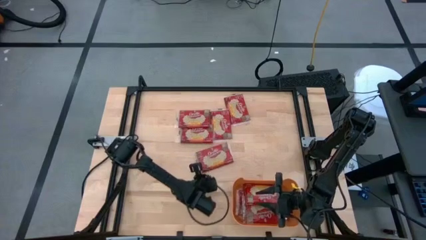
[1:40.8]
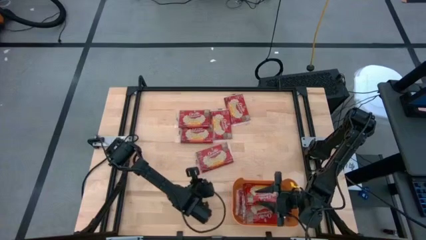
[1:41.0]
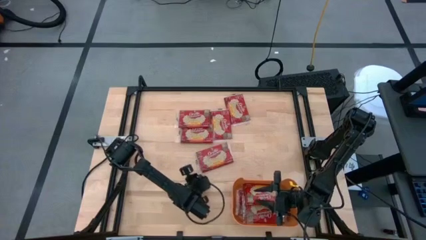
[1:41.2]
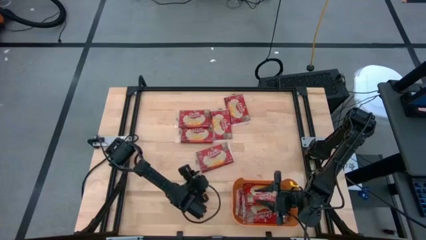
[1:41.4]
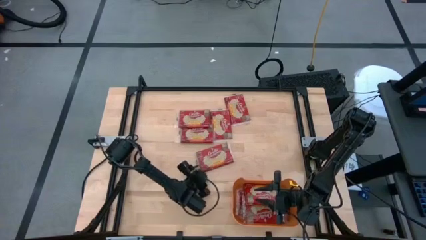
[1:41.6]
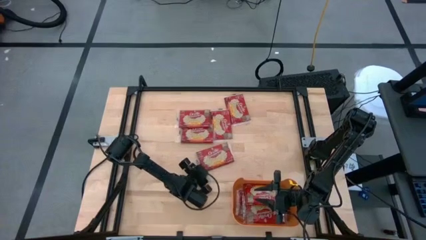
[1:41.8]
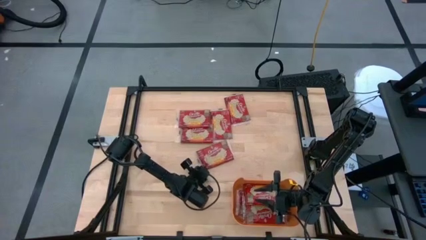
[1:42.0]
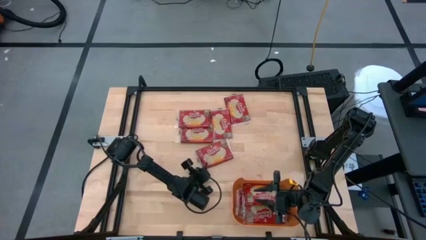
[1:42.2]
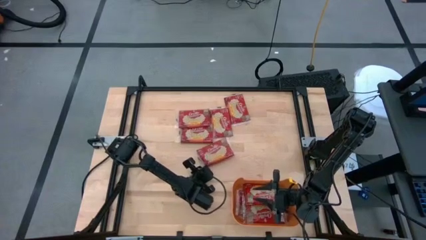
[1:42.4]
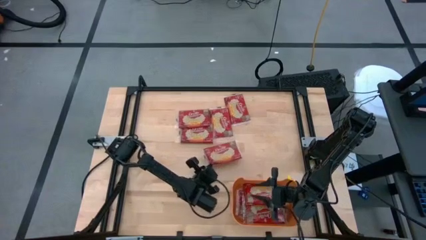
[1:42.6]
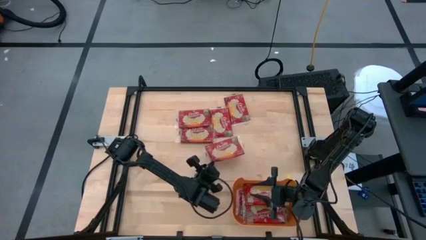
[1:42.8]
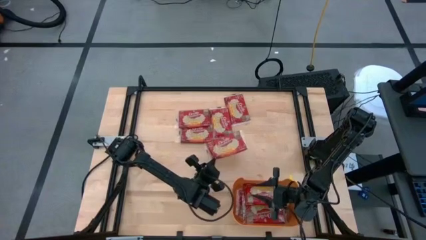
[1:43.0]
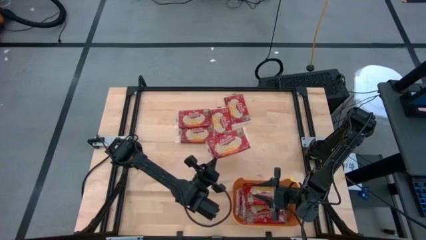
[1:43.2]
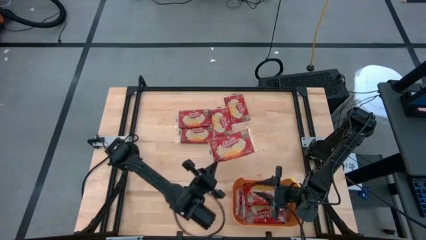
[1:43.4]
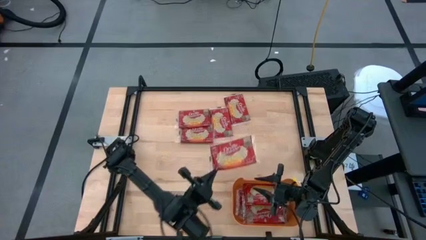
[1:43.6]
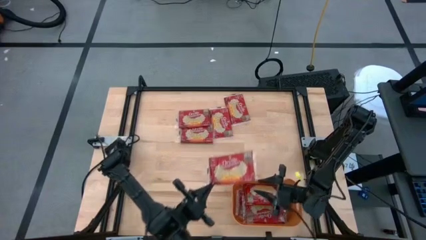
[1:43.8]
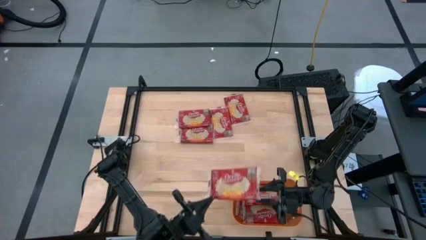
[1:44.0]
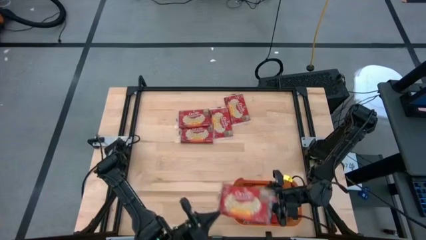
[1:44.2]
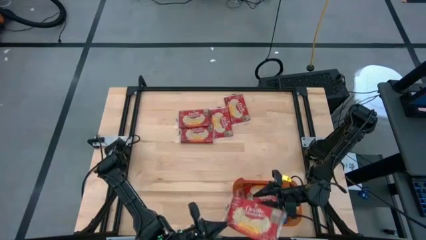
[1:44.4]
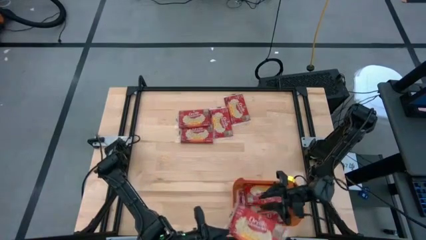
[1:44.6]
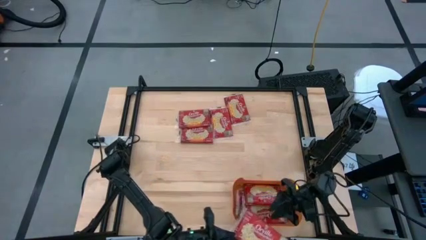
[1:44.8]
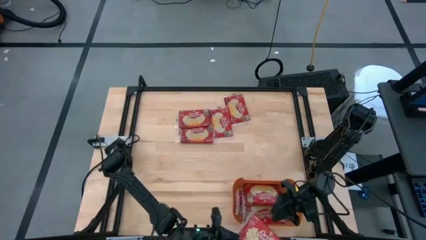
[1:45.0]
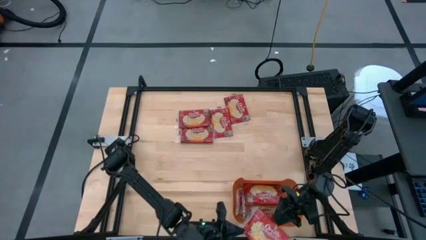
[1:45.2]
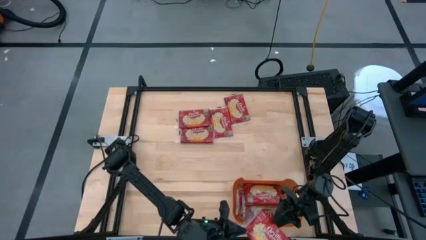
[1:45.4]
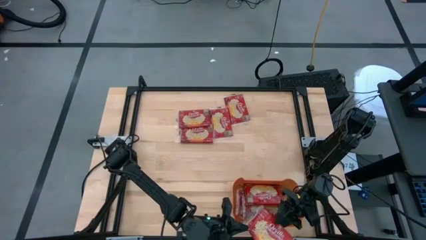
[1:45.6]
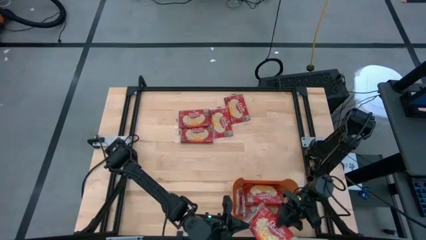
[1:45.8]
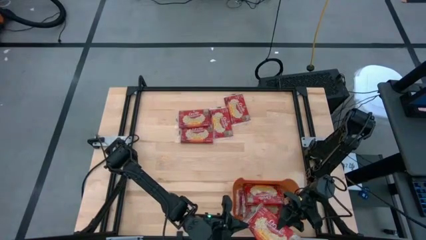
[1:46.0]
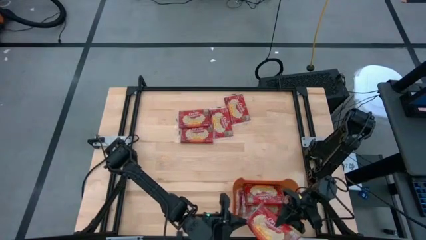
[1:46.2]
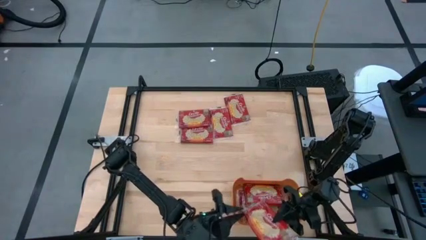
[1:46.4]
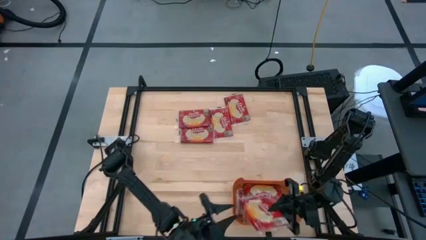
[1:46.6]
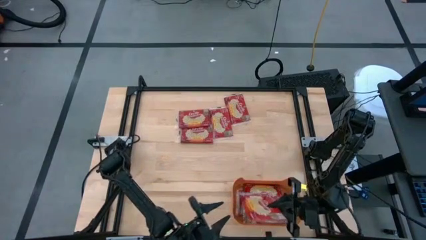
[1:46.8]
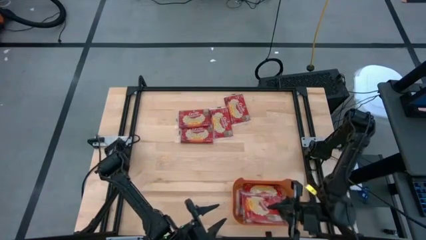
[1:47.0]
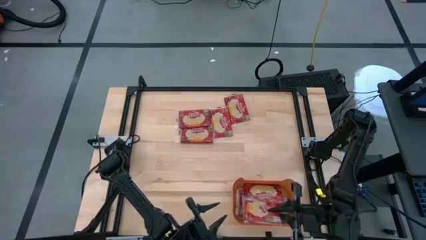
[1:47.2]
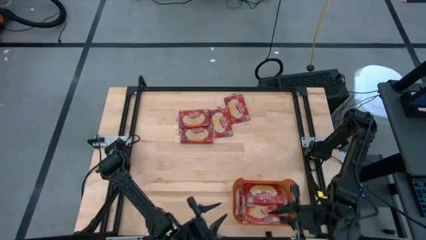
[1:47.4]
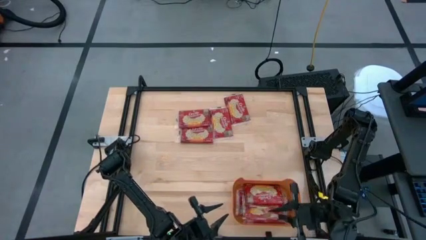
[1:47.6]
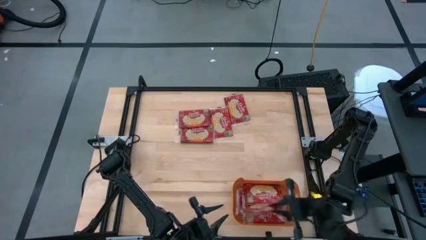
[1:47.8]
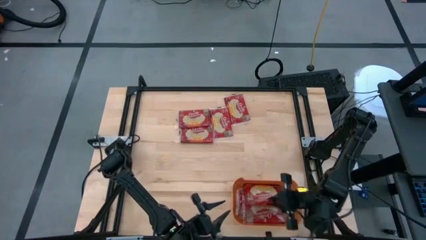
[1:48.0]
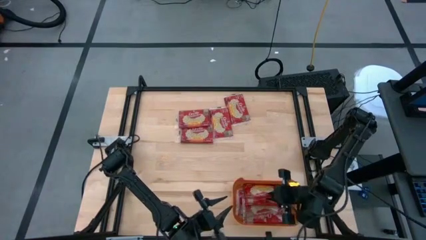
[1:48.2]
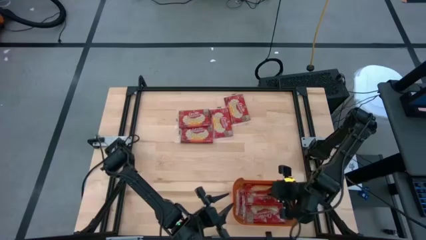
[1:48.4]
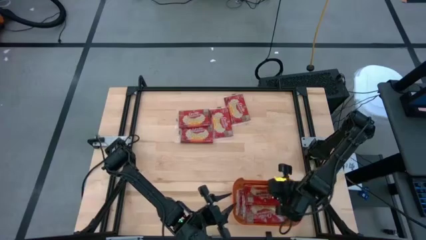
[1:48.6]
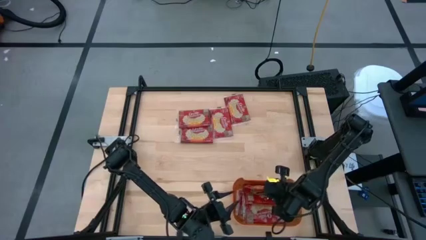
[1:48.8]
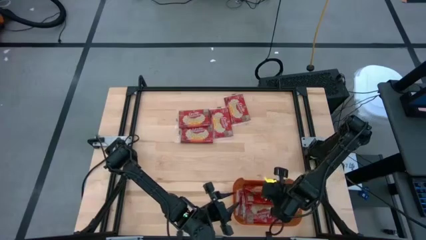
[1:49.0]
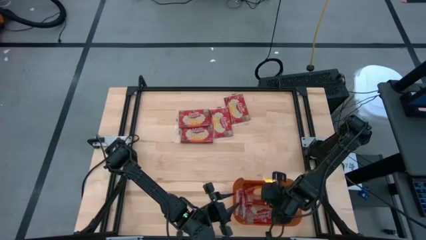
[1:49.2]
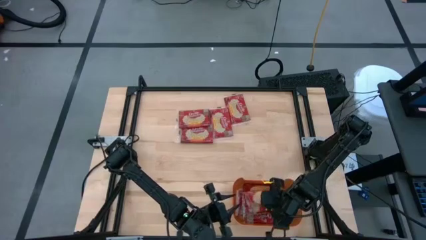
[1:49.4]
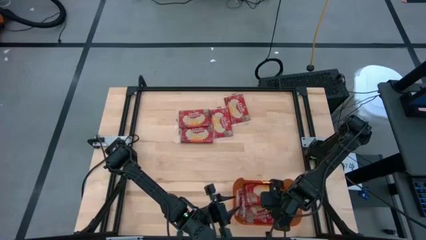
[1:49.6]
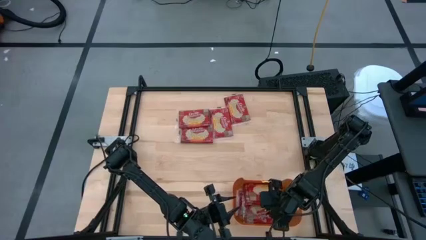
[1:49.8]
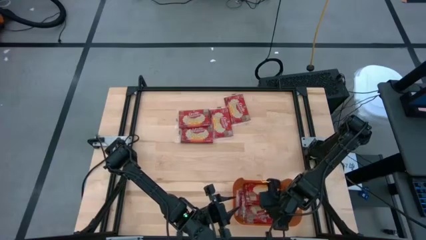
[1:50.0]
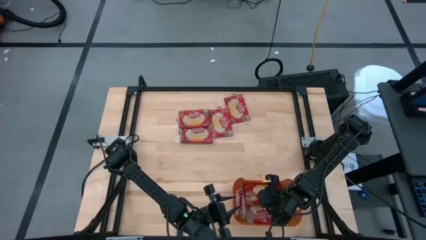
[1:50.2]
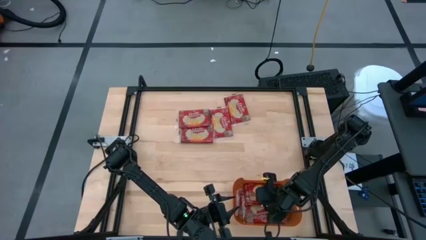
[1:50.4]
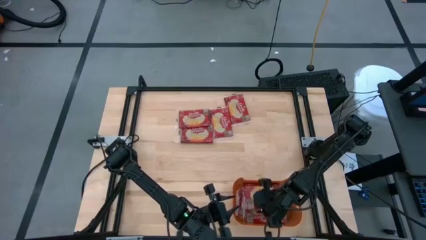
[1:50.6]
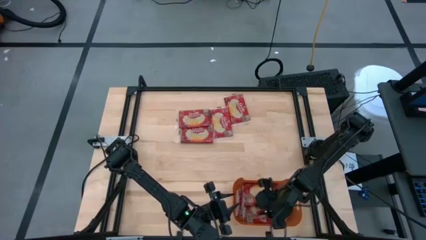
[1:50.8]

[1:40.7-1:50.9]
Task: Sort popcorn bags into baskets
Put the red popcorn bag into the orange bin

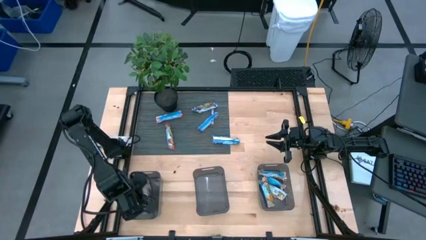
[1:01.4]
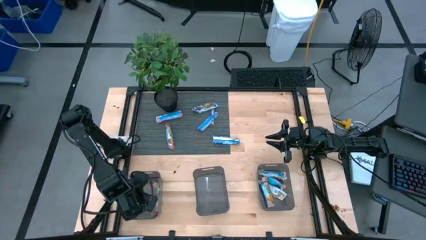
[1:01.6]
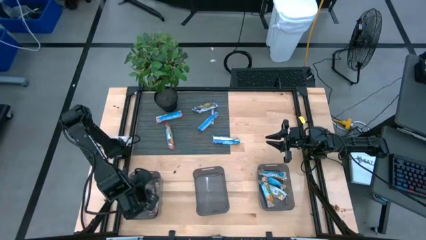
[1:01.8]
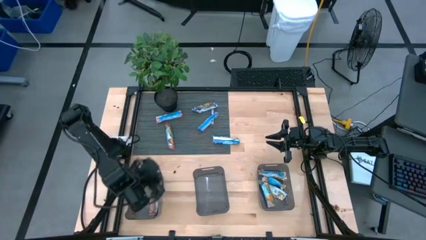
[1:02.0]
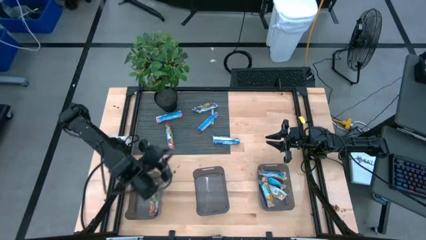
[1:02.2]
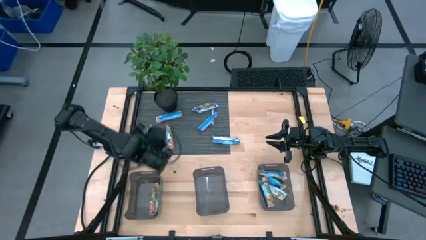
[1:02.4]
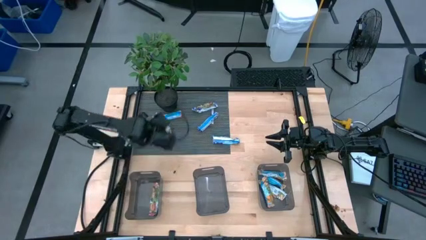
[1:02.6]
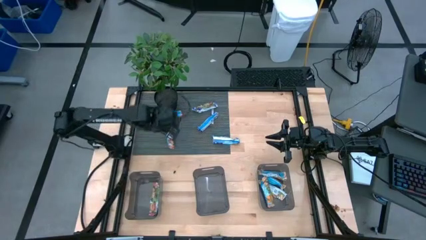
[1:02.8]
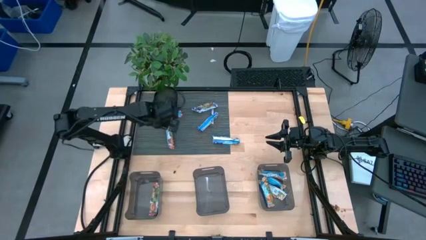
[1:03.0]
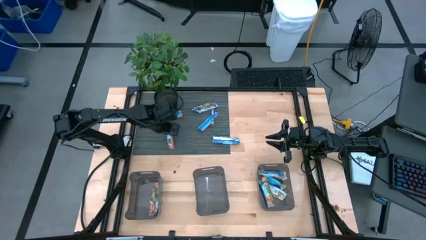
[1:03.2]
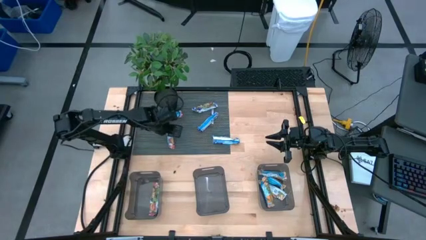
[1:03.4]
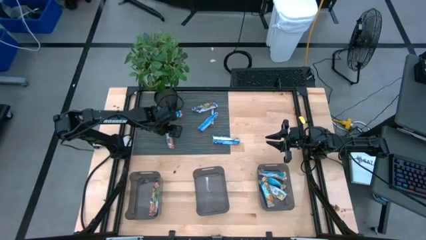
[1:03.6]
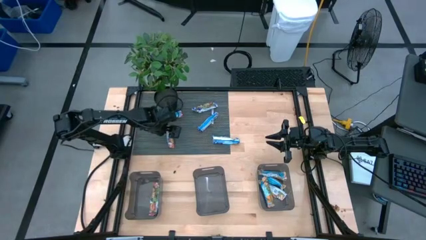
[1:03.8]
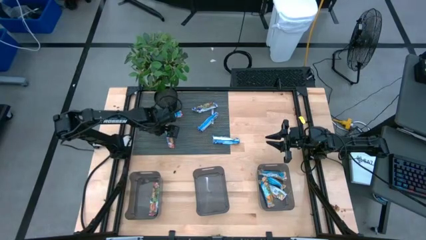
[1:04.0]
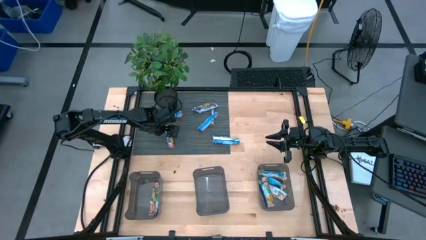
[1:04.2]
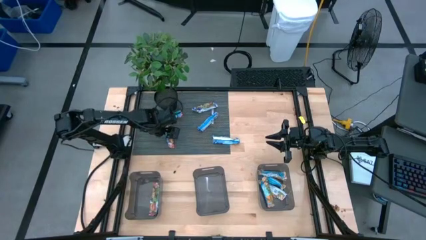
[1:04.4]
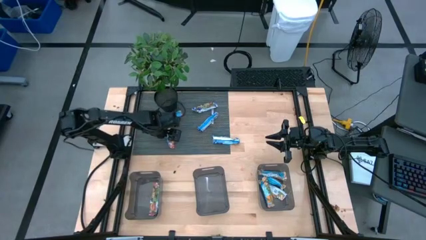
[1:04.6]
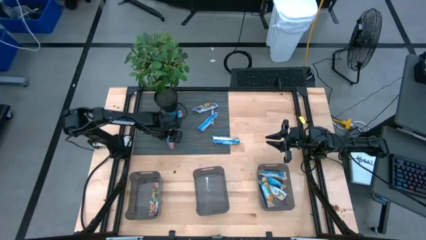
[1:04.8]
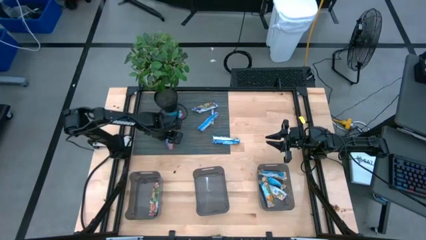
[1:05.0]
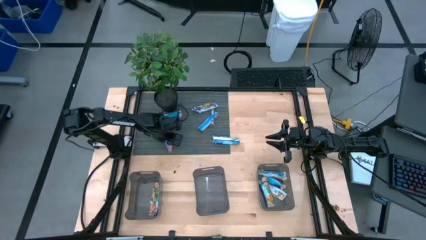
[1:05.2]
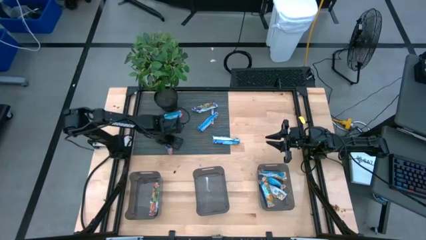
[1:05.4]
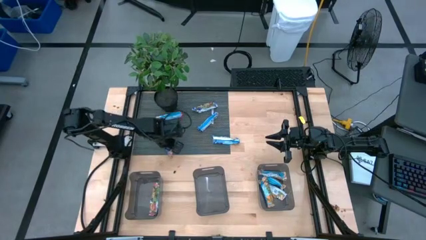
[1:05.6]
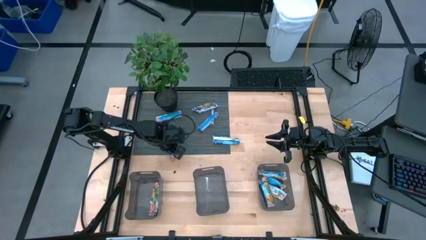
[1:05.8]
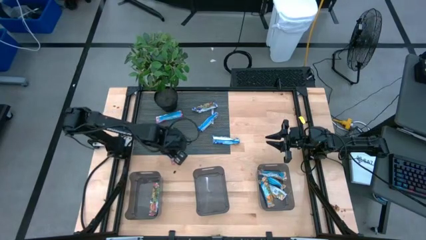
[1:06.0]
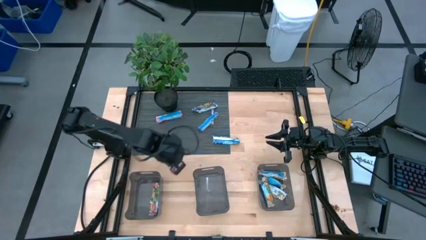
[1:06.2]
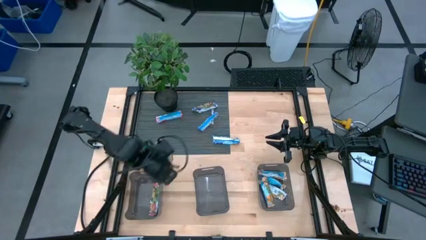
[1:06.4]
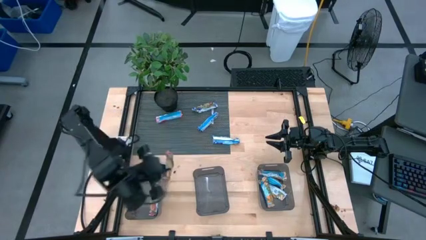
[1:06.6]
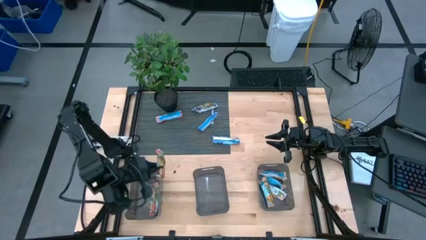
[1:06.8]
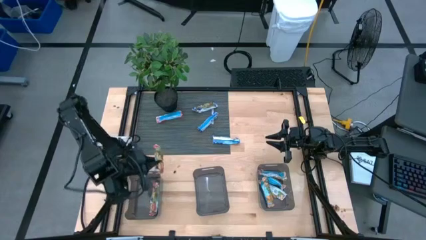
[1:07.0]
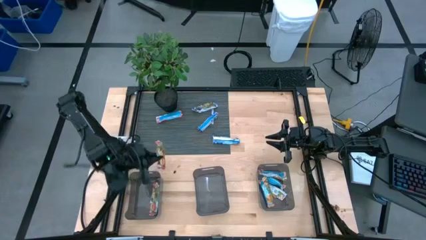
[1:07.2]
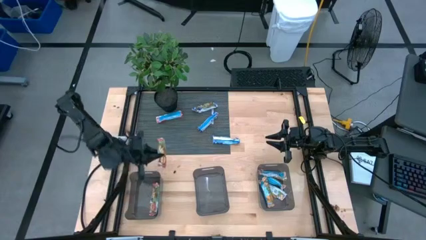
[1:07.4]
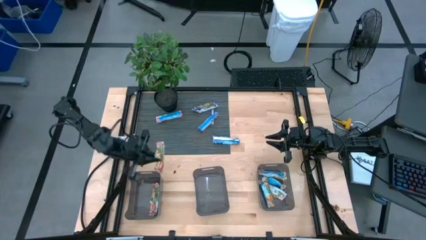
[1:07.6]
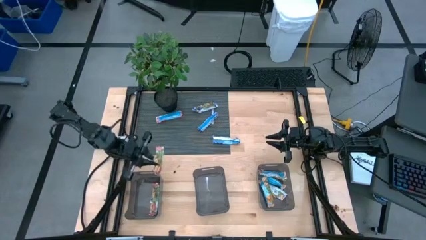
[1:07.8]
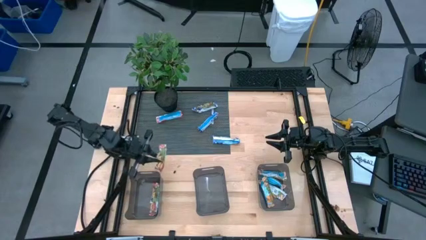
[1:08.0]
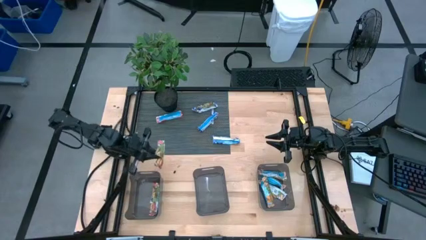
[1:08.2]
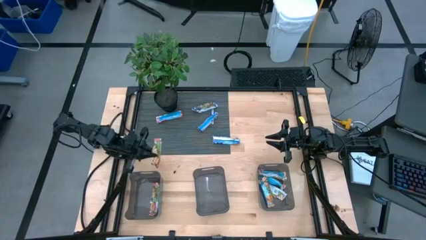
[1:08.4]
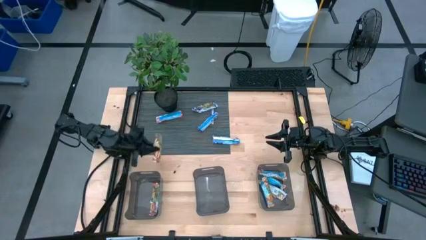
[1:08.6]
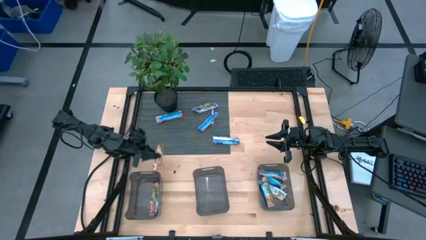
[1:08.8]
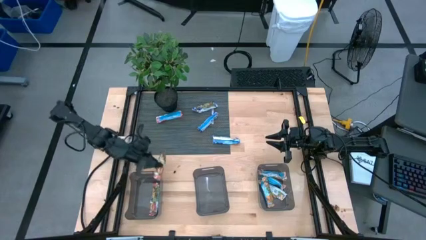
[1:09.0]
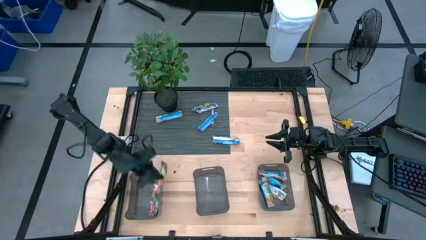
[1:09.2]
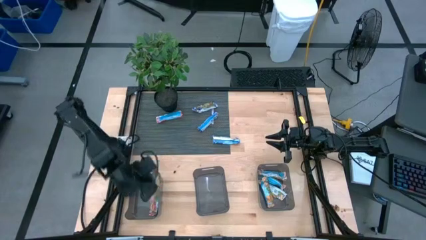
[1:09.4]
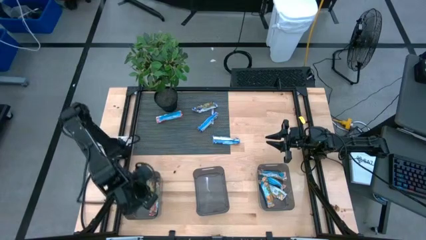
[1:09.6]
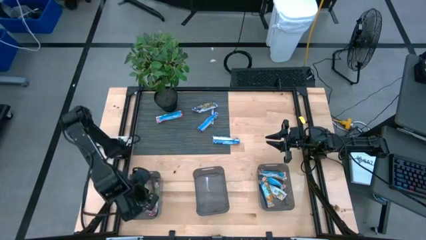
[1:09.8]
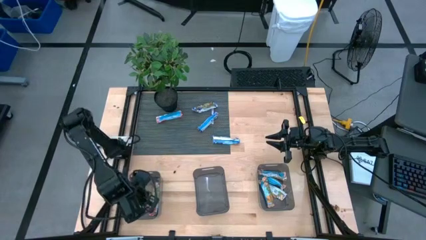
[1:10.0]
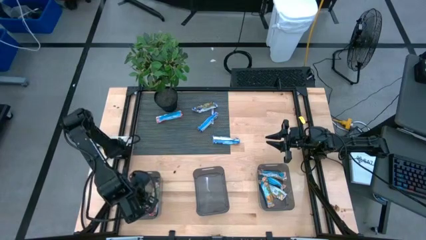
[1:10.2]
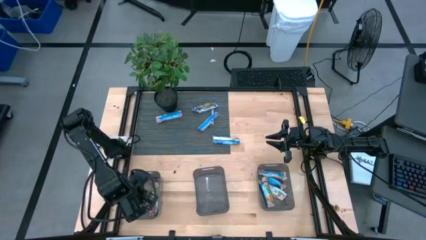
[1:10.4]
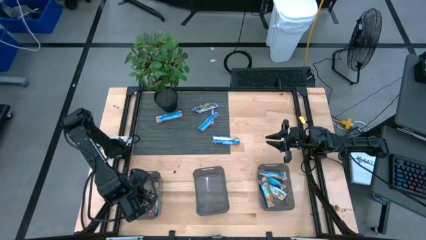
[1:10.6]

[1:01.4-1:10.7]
Task: Pick and place Granola Bars by type
Adjust the red granola bar
